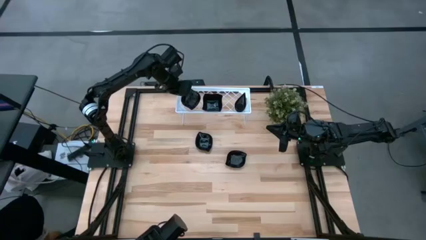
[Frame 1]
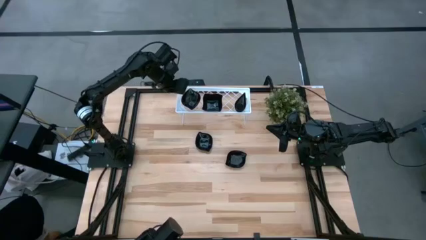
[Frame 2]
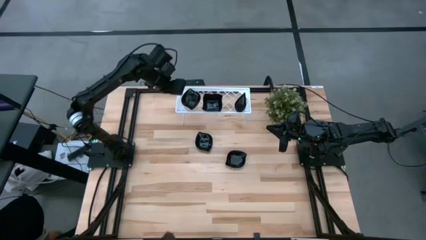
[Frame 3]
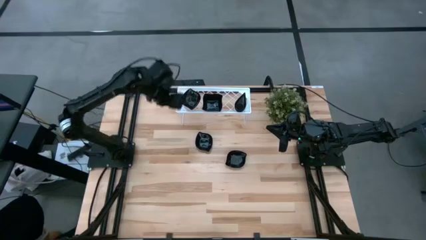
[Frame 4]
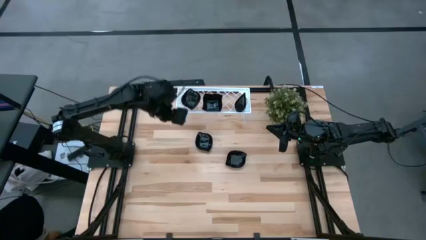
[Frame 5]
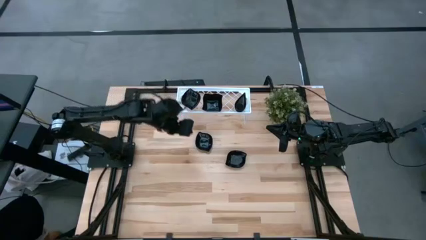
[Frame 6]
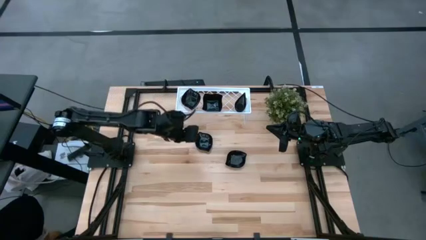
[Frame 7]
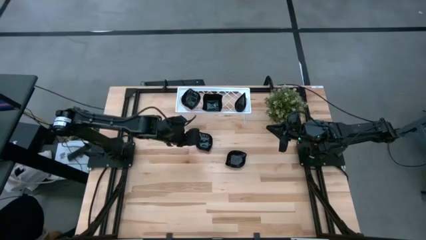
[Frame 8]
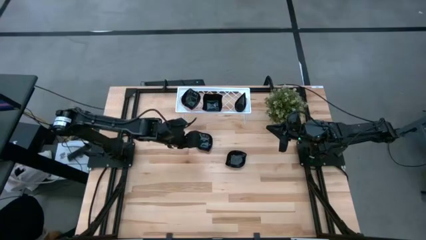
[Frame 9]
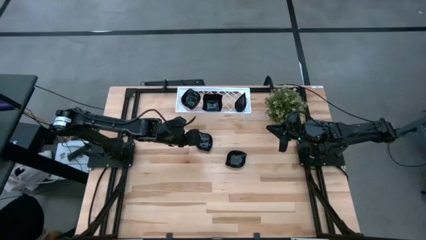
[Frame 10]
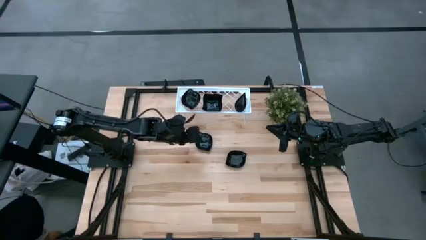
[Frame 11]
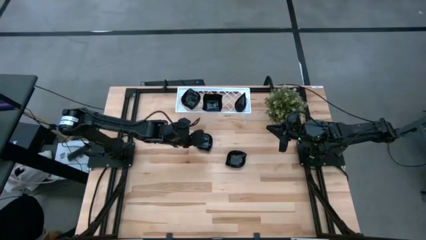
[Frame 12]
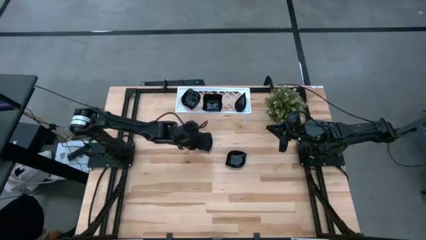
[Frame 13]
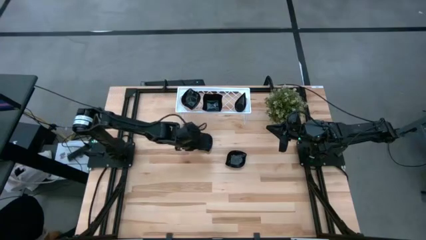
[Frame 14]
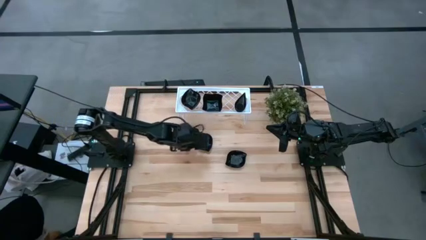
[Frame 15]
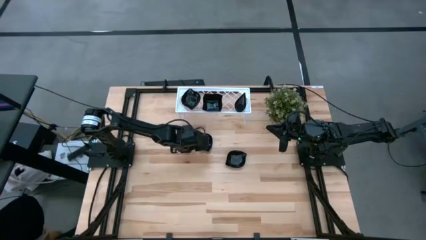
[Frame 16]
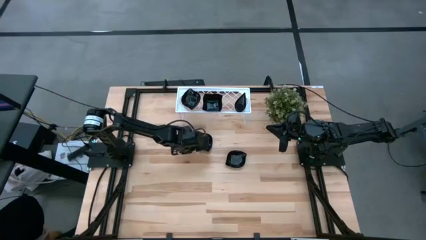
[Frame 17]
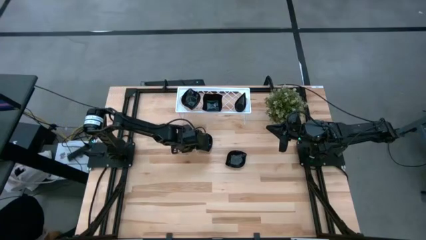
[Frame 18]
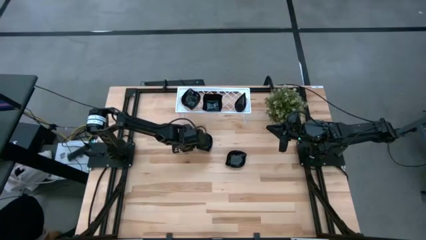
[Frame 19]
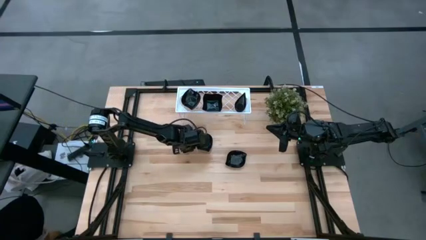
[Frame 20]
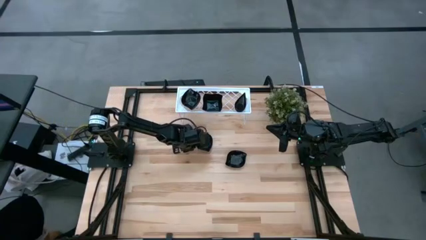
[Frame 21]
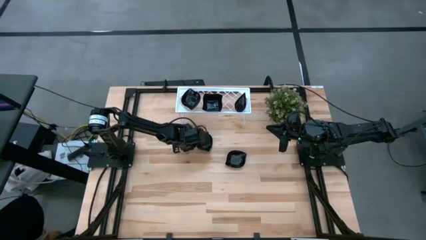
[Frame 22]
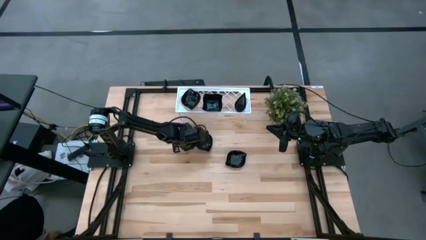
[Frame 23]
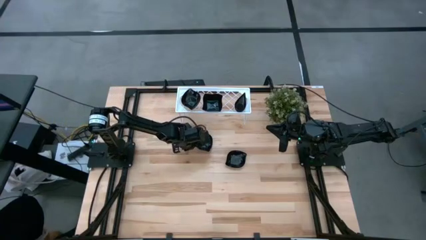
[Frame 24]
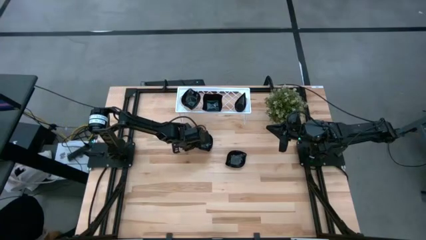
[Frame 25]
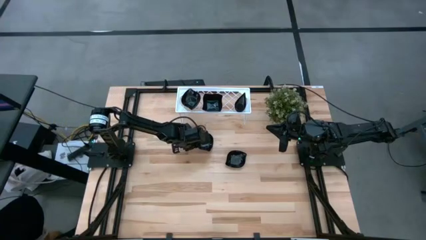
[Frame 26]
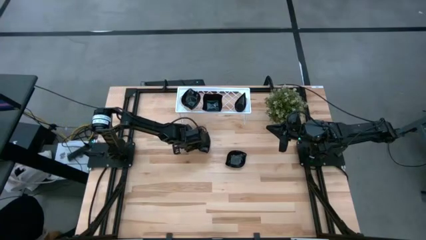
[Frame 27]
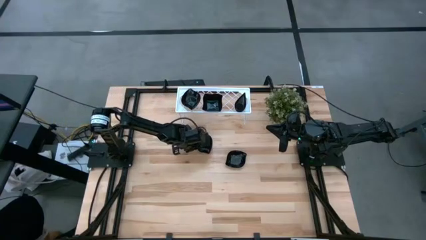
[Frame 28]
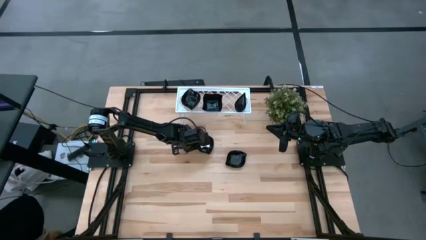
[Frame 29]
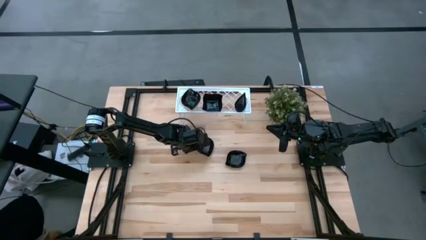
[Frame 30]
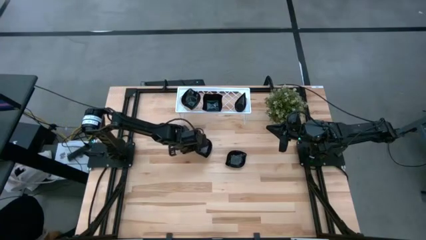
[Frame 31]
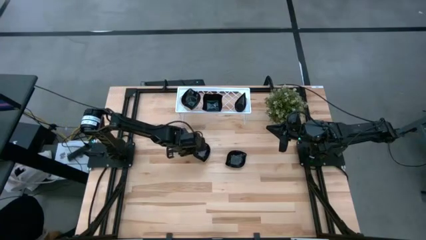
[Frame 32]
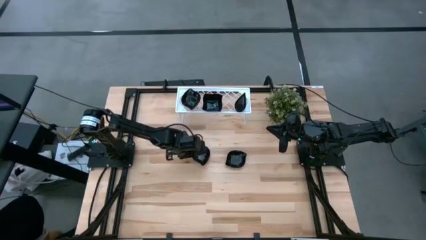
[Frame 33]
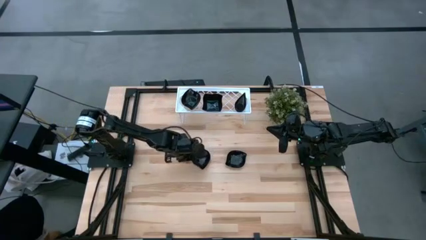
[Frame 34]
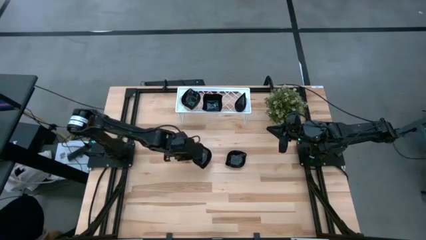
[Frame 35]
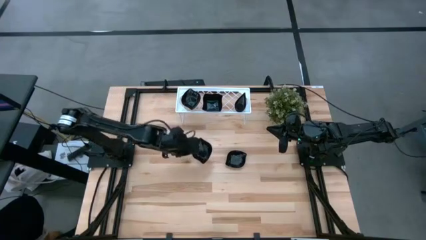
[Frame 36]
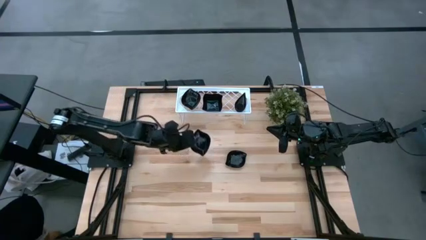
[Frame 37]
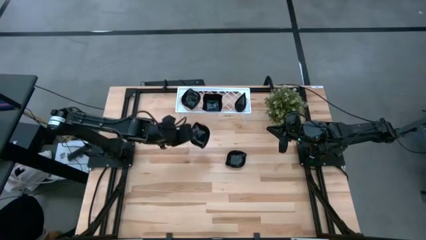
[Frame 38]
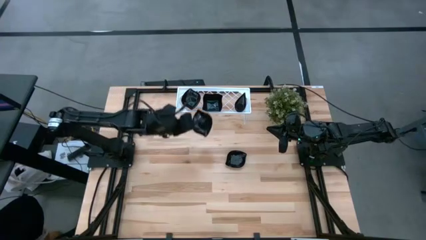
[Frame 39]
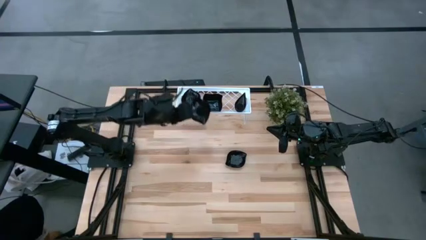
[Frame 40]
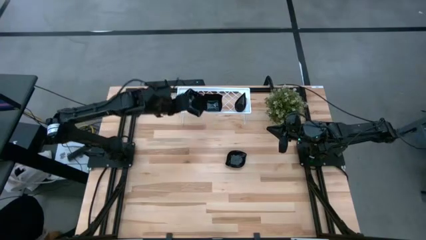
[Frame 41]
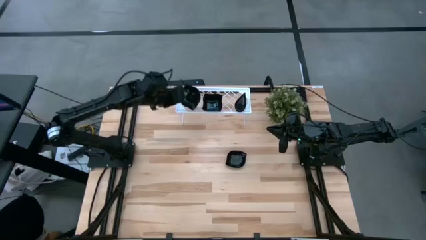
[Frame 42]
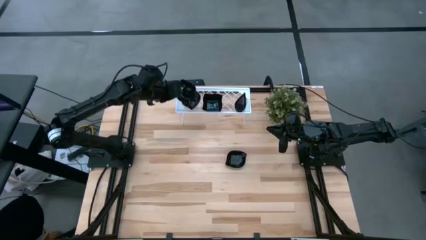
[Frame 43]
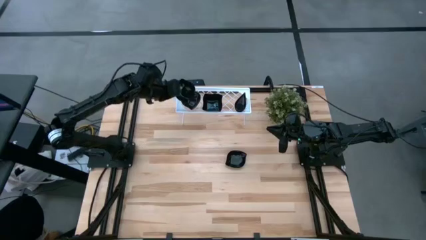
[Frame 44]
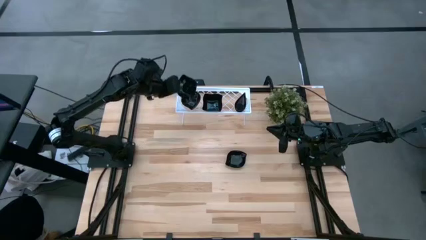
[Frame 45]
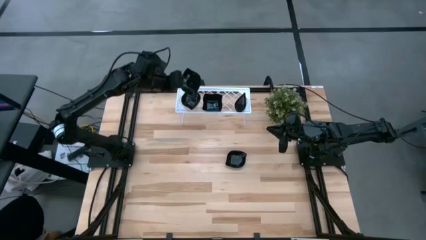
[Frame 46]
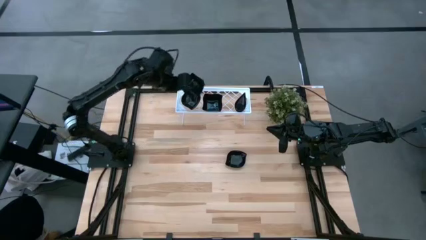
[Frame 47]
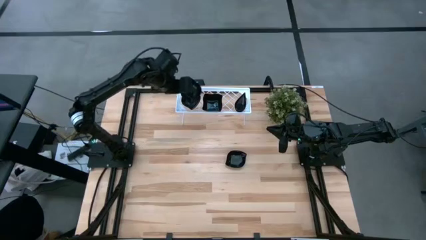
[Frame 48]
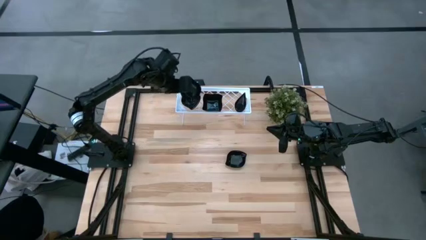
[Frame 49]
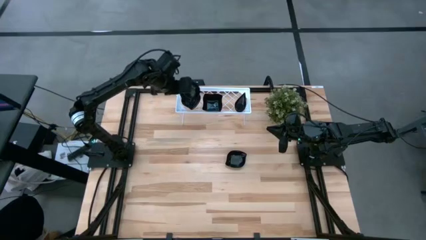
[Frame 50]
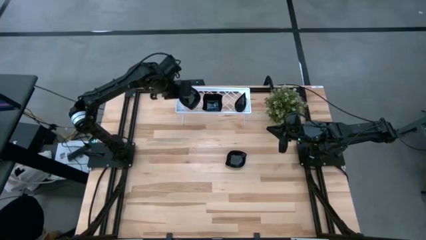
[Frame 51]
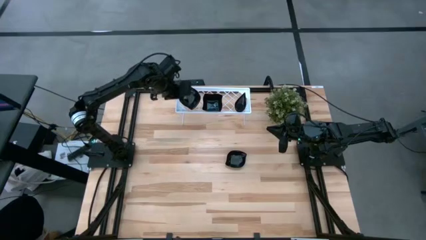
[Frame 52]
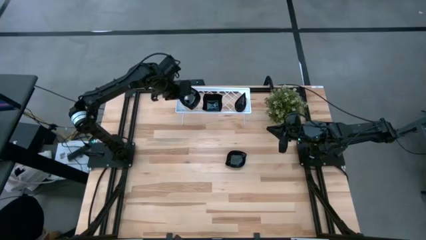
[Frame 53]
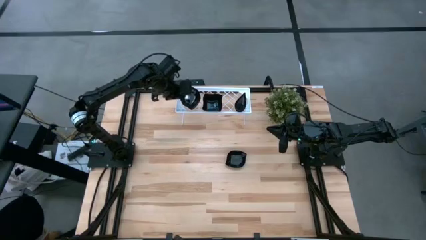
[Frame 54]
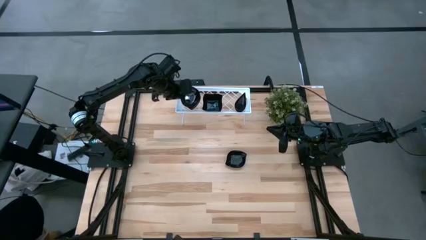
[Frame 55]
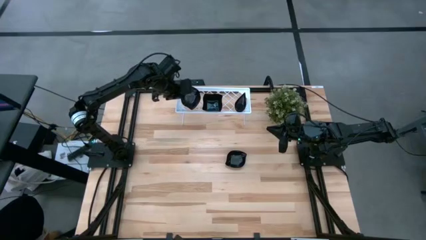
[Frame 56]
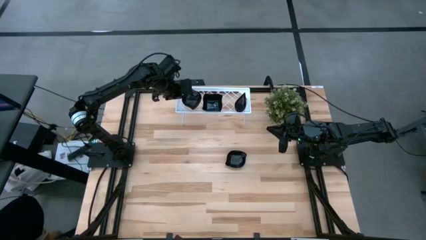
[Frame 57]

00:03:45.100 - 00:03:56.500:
Task: Pick & Place Mini shaped plates
Stack the leaf-shaped plate on top of the leaf-shaped plate on the shelf
